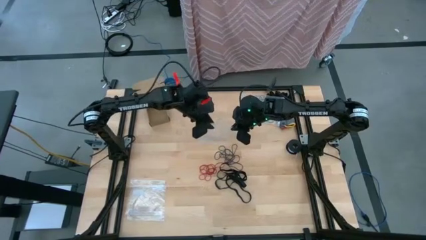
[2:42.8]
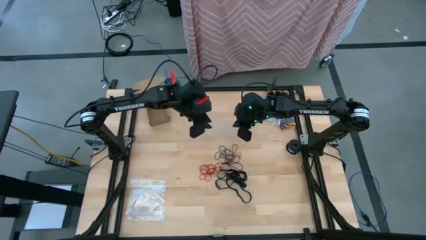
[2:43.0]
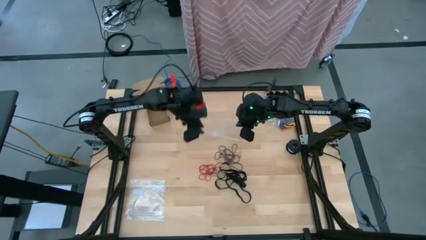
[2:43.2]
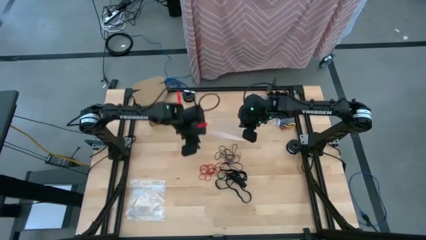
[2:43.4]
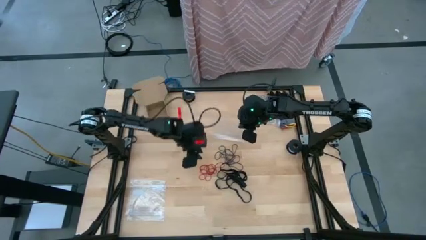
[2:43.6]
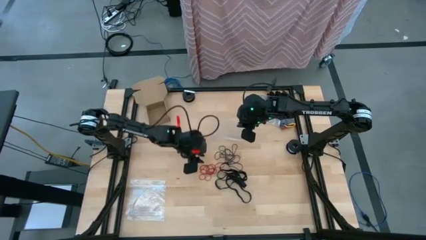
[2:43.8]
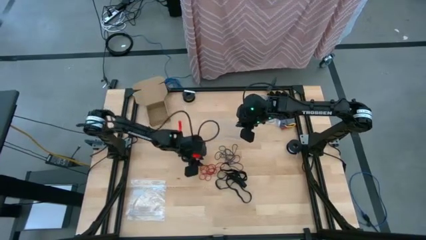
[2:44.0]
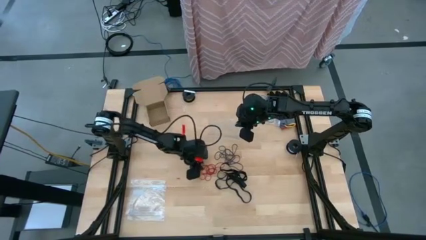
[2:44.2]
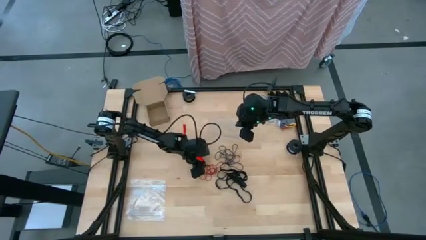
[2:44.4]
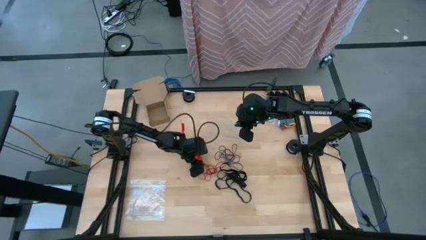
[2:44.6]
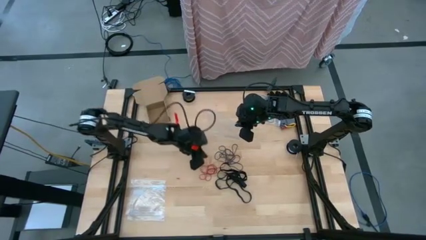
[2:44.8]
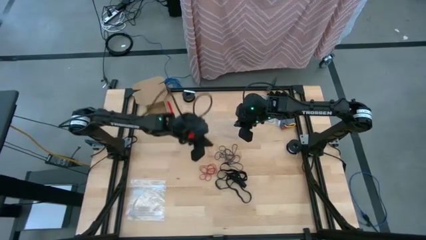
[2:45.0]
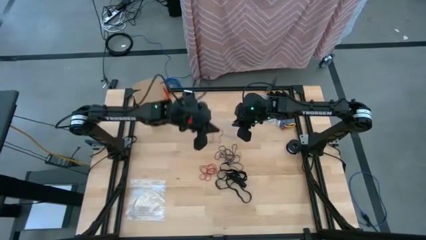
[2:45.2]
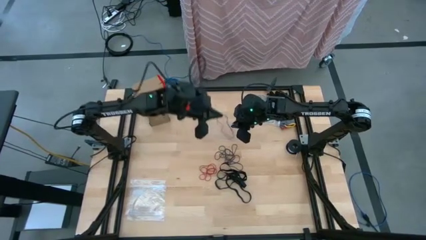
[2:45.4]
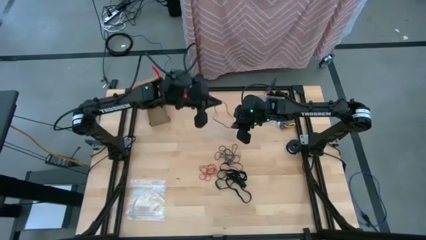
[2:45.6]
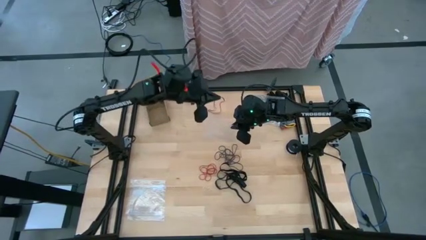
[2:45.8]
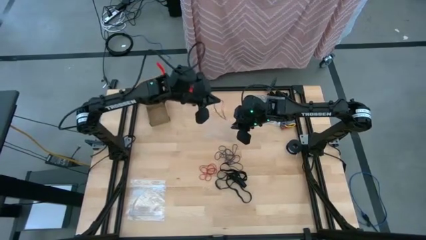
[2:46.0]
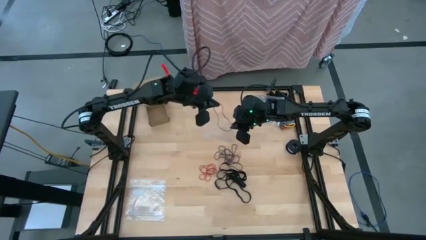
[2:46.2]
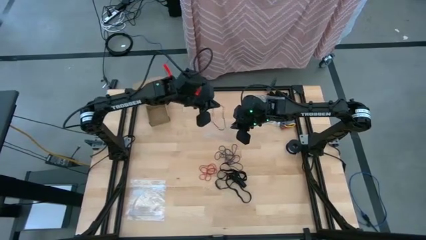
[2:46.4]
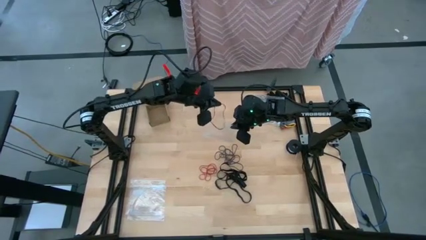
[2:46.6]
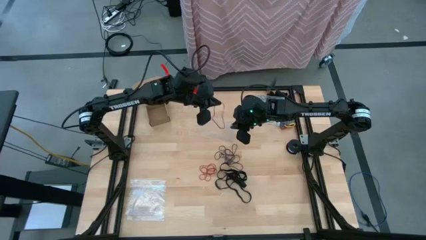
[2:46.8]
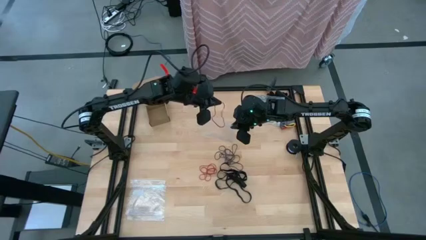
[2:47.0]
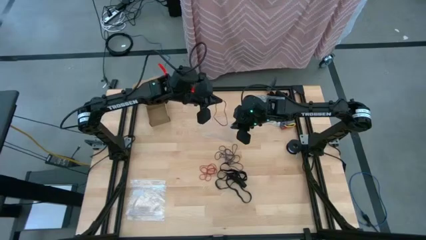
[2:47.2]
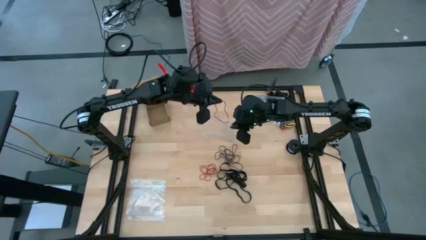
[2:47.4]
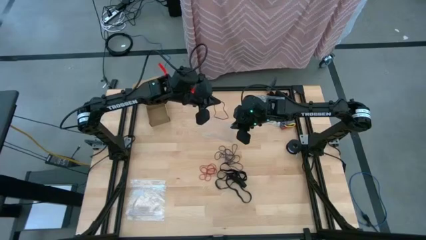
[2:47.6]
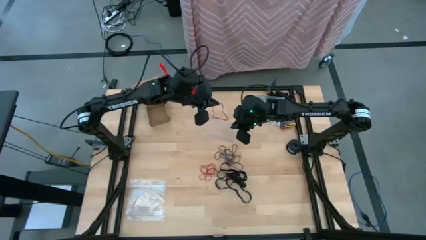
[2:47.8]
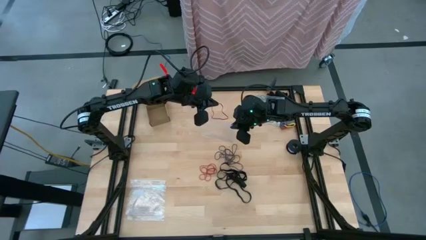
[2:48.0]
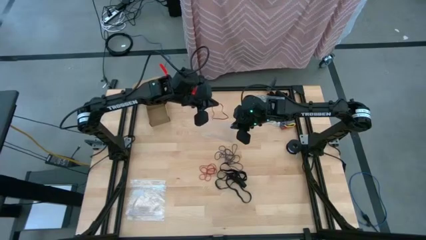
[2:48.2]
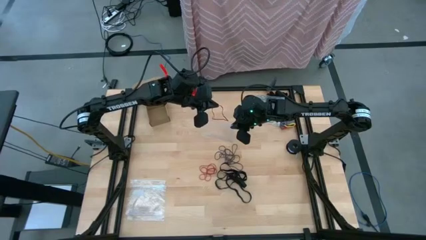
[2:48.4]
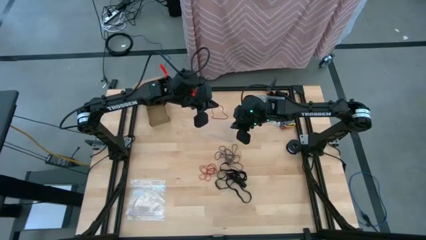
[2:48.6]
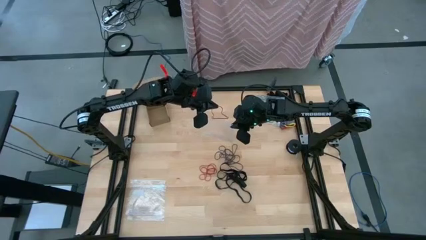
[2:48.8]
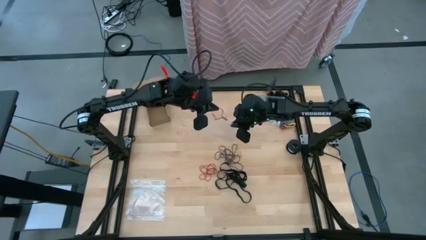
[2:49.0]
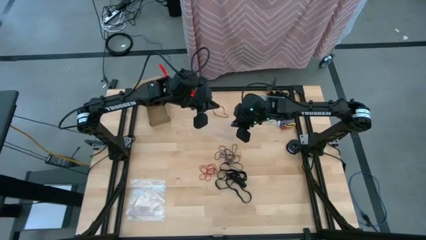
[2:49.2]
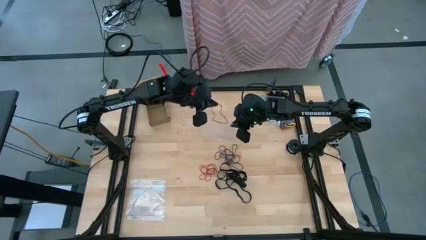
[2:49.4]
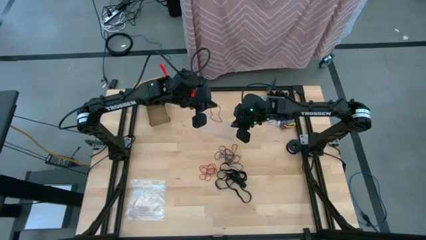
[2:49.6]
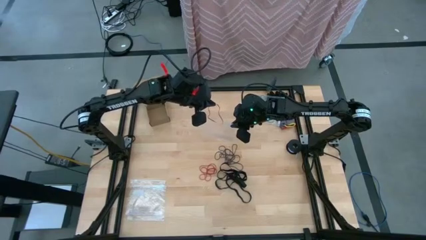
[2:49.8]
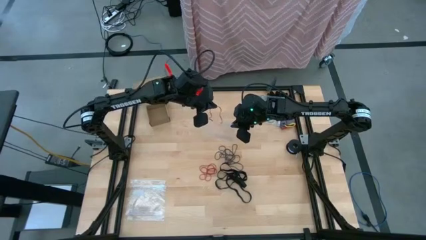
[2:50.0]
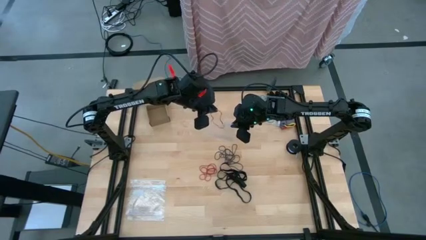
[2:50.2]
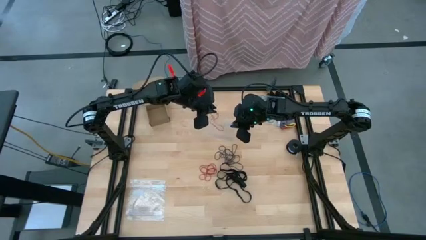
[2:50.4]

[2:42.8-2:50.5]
Task: Sort rubber bands
Put the red rubber band into the transparent zip bag

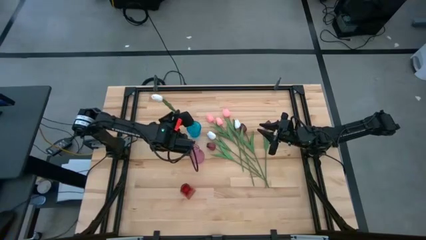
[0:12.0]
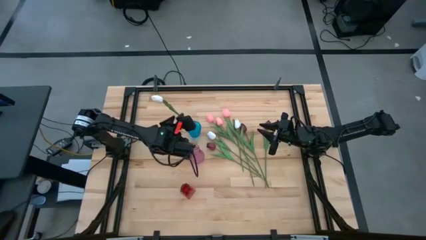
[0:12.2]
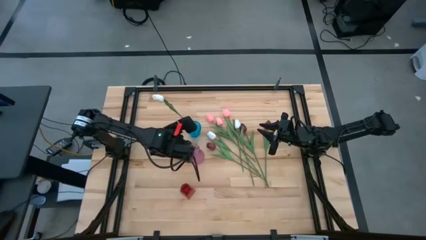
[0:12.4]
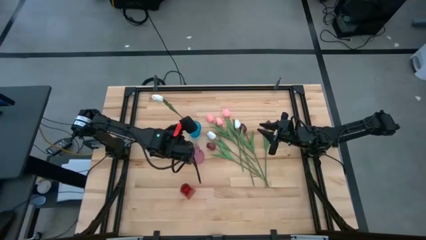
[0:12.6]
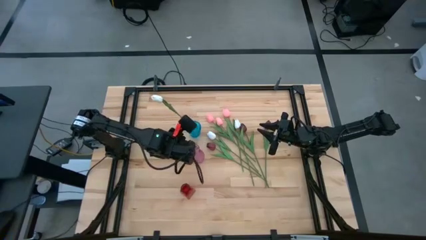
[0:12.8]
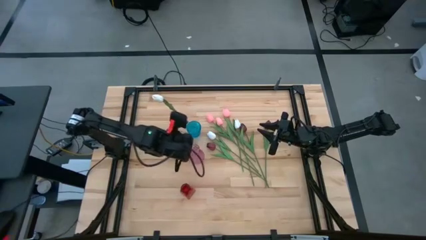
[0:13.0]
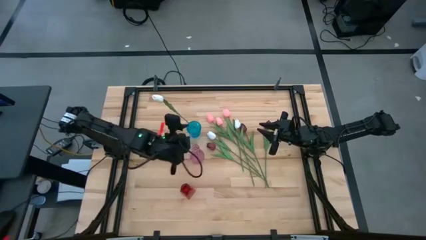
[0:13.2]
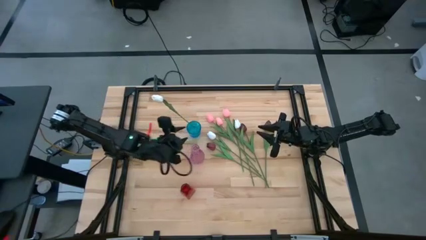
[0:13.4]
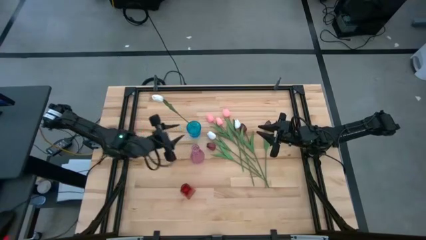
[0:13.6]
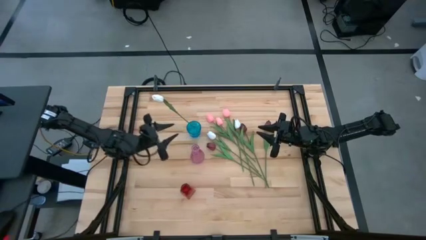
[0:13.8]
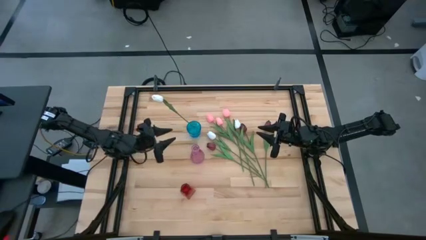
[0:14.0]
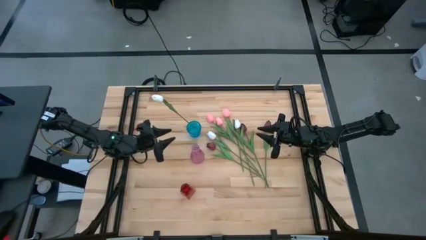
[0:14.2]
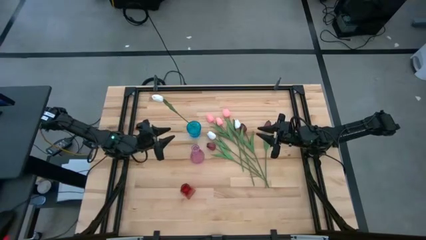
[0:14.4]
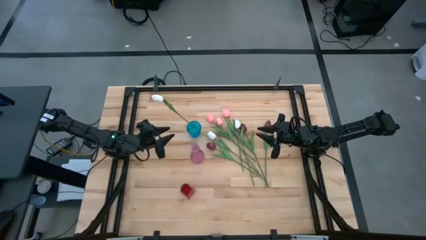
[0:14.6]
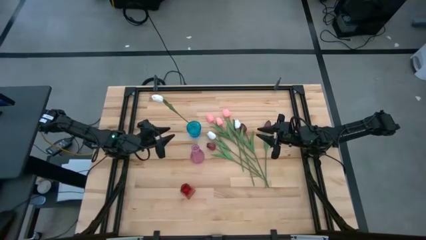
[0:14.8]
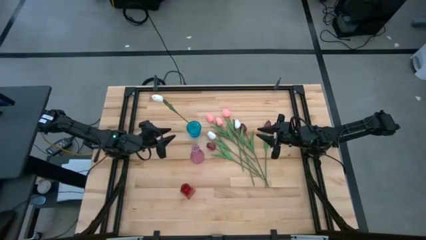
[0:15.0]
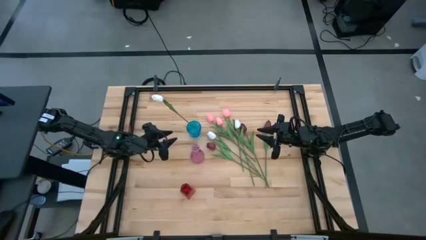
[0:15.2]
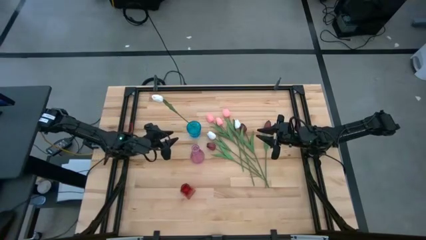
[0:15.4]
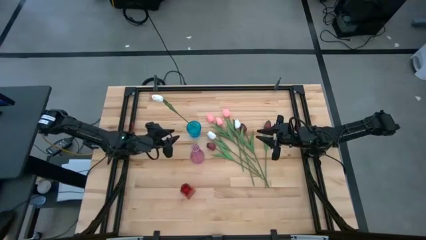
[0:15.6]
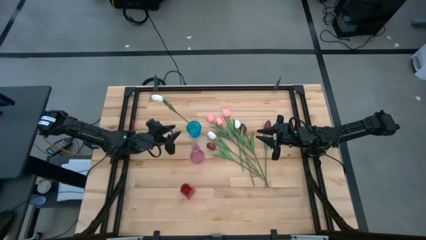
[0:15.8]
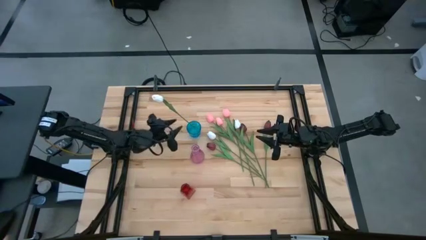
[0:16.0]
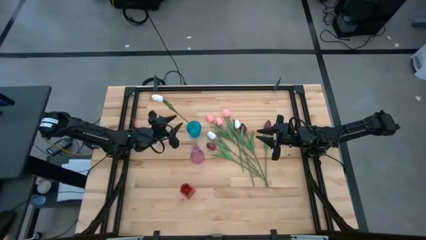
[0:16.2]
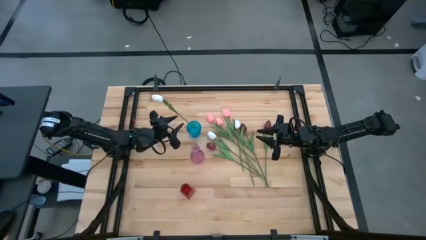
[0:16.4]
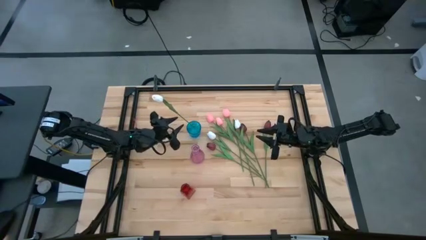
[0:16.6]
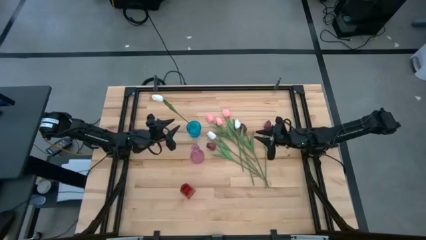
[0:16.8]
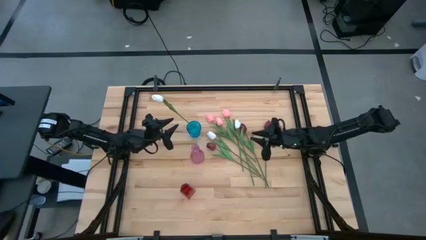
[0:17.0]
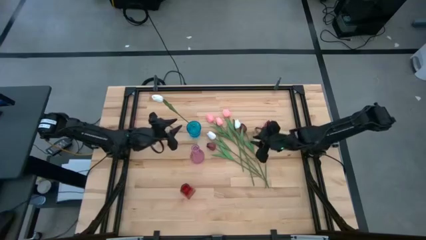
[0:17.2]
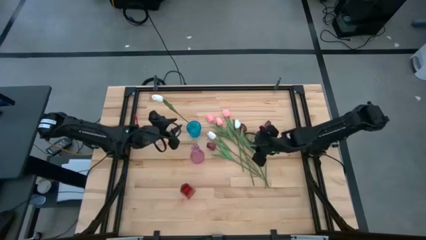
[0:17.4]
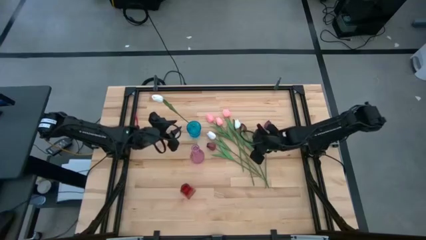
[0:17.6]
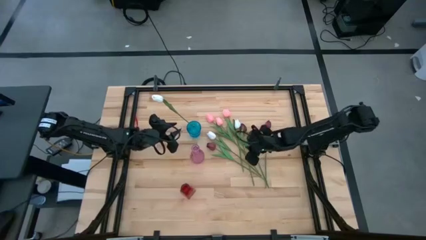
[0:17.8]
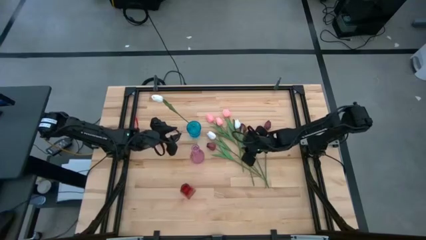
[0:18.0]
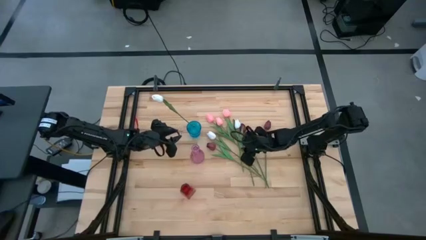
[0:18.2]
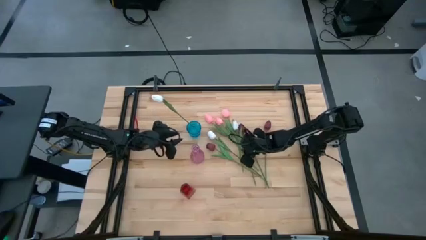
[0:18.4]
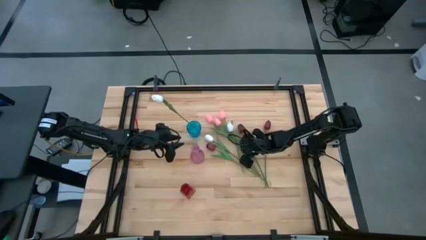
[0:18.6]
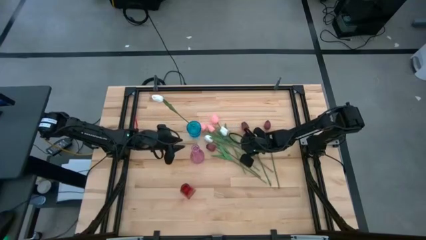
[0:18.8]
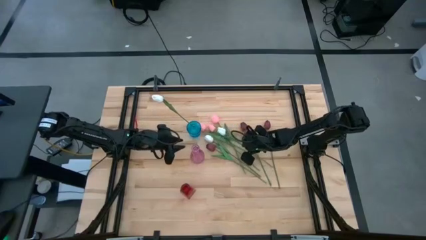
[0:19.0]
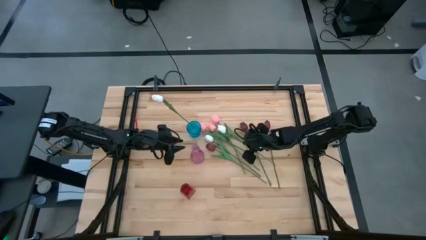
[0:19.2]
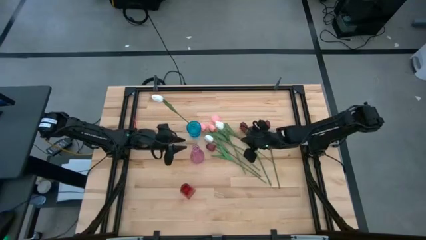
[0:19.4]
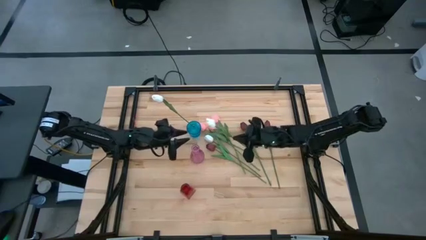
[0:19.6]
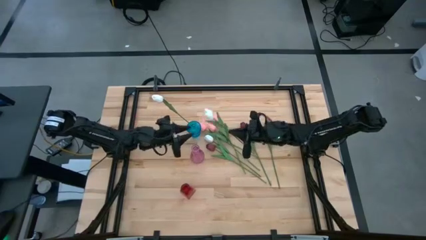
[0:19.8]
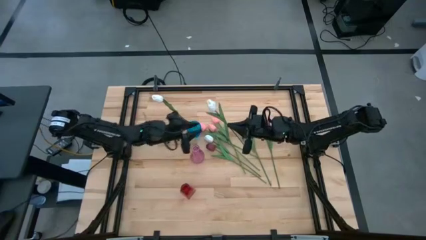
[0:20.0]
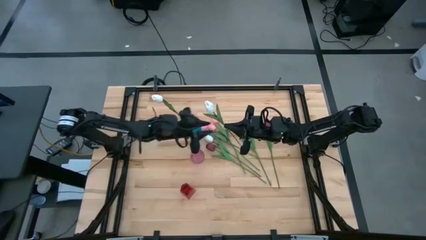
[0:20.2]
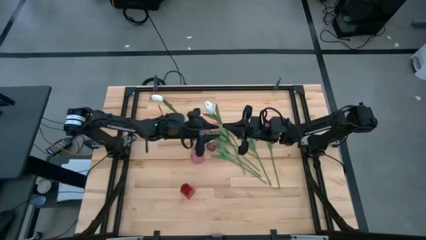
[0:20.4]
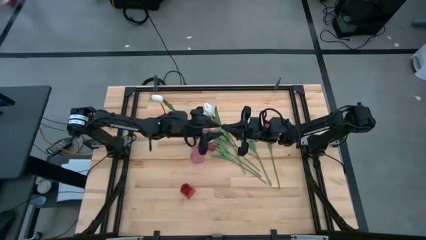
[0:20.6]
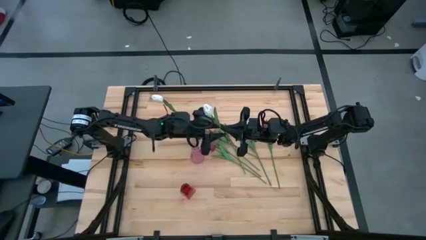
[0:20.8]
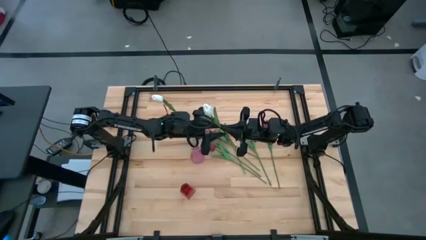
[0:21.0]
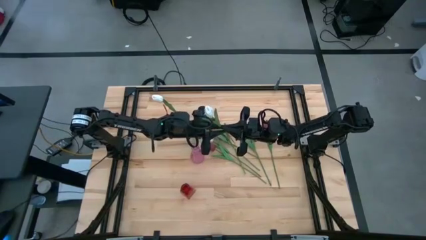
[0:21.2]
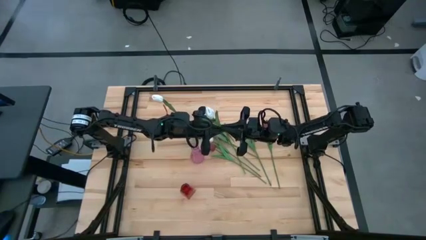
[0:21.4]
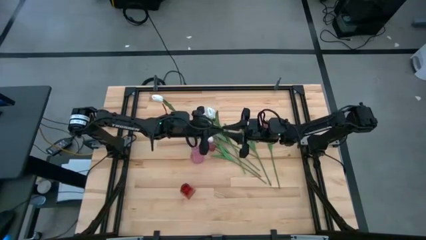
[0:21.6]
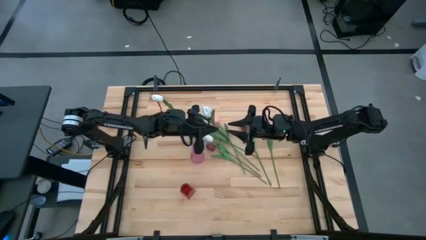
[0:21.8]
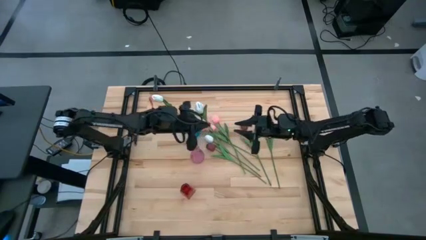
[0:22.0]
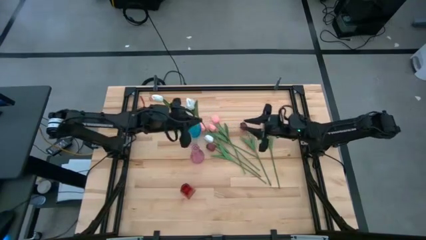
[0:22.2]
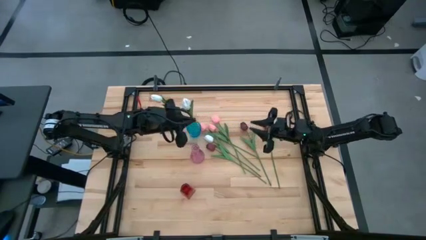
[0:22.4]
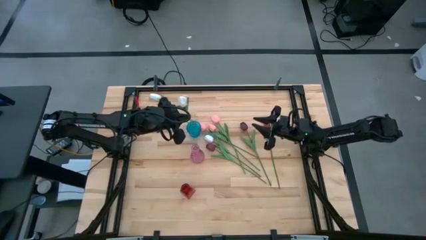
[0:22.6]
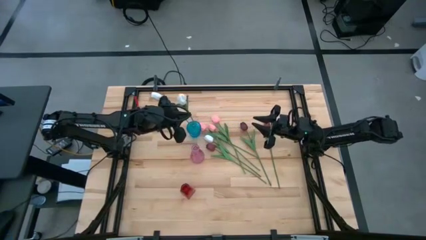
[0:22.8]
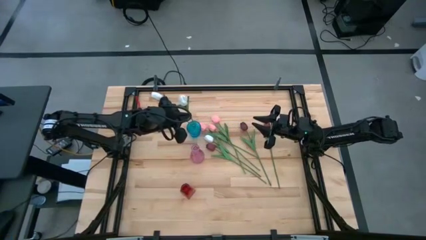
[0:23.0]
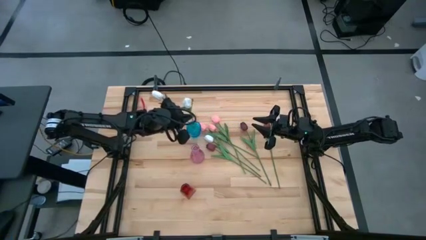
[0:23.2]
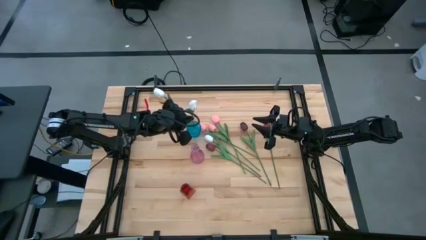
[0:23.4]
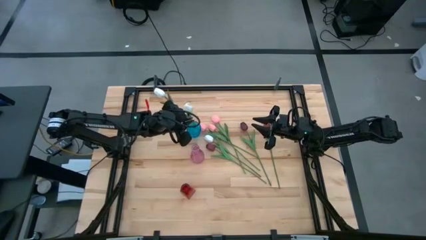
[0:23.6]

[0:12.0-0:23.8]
Task: Sort flowers into vase by color
Put the right white tulip into the blue vase
